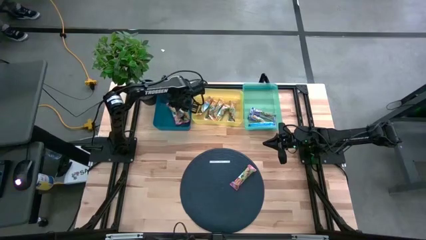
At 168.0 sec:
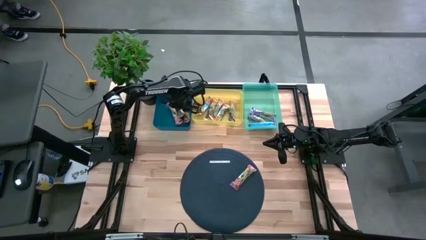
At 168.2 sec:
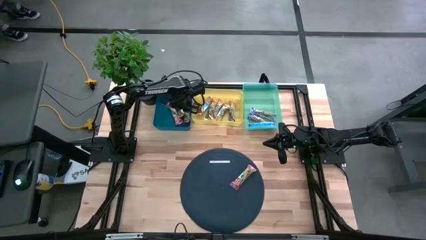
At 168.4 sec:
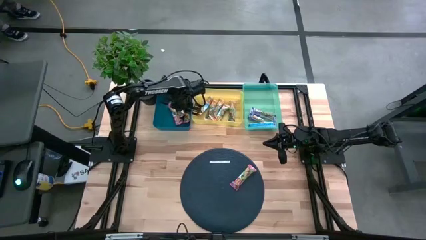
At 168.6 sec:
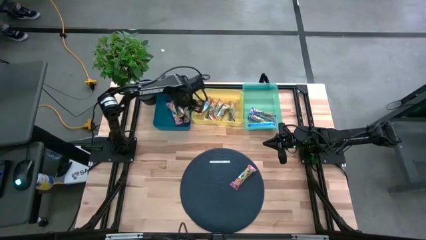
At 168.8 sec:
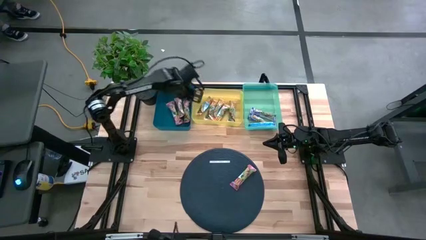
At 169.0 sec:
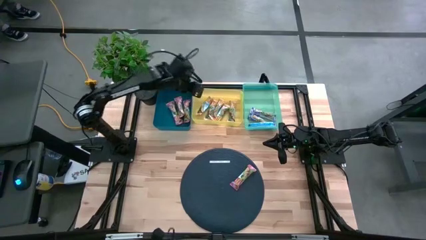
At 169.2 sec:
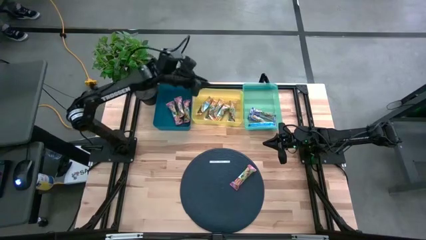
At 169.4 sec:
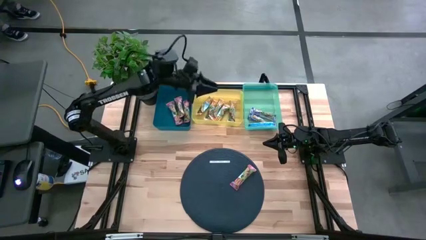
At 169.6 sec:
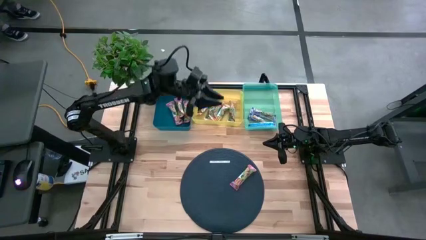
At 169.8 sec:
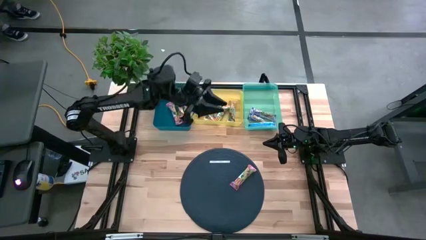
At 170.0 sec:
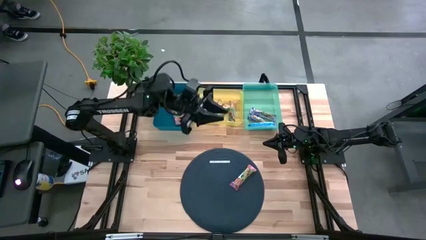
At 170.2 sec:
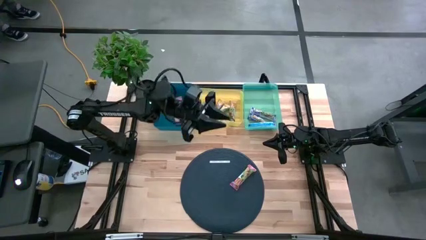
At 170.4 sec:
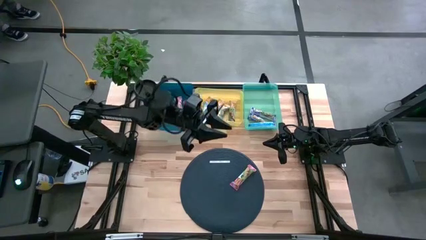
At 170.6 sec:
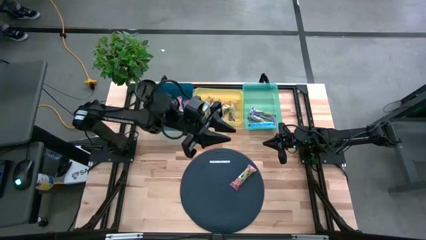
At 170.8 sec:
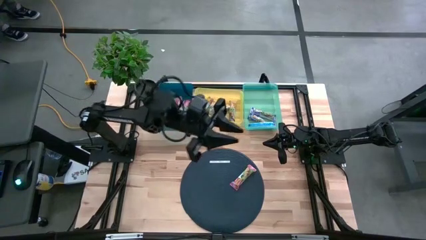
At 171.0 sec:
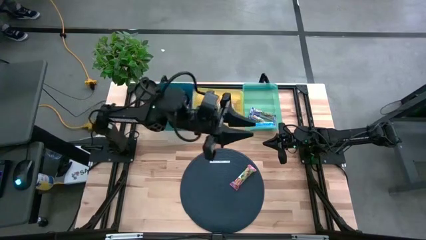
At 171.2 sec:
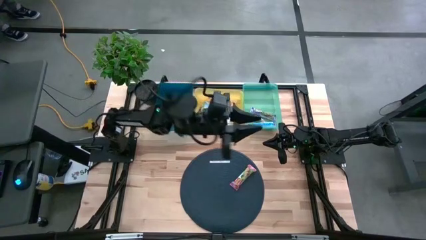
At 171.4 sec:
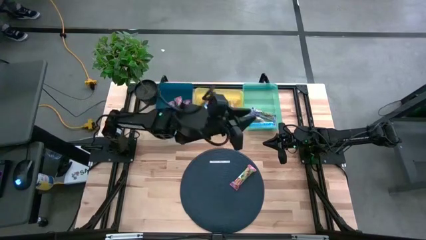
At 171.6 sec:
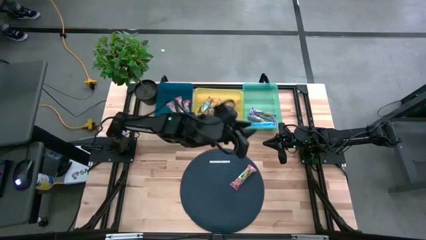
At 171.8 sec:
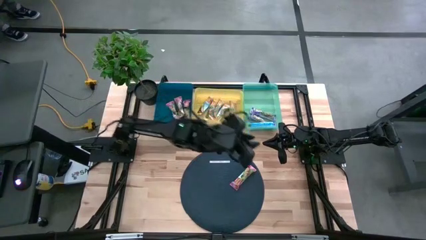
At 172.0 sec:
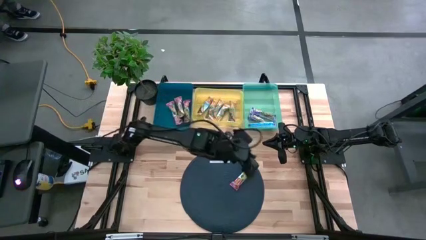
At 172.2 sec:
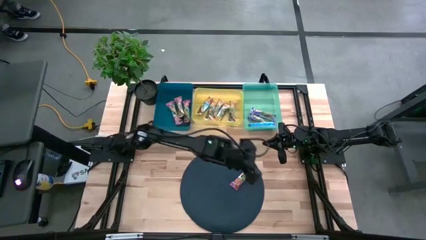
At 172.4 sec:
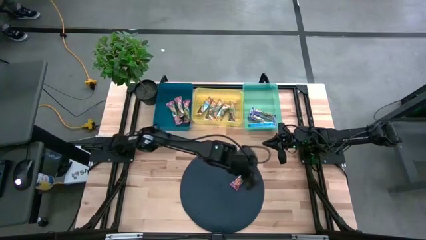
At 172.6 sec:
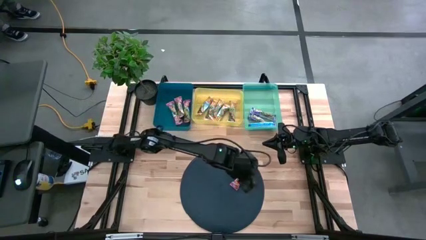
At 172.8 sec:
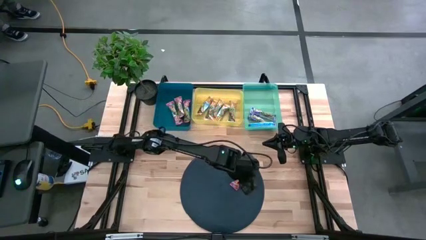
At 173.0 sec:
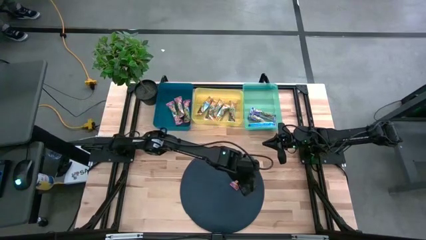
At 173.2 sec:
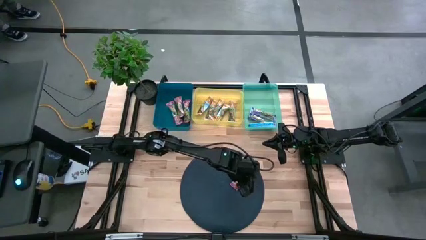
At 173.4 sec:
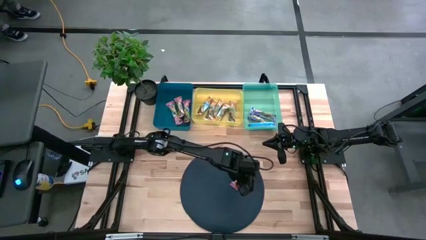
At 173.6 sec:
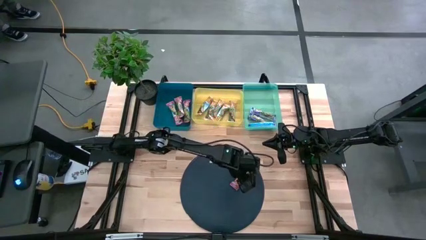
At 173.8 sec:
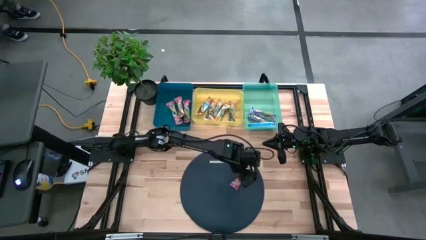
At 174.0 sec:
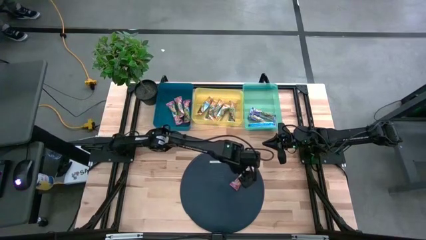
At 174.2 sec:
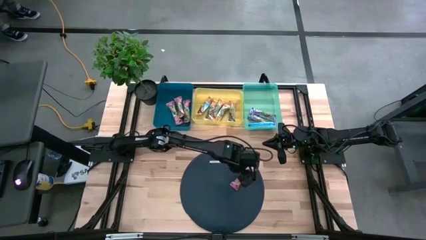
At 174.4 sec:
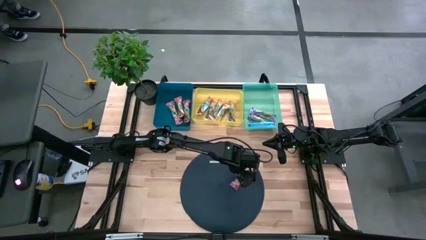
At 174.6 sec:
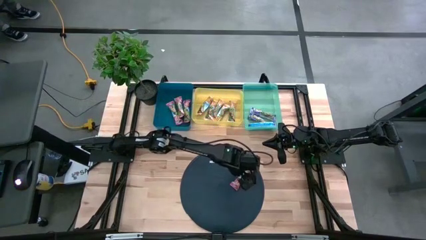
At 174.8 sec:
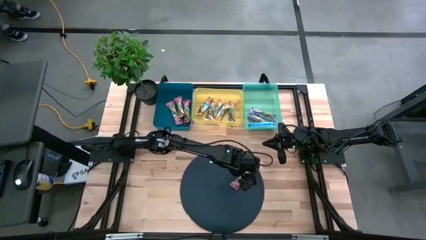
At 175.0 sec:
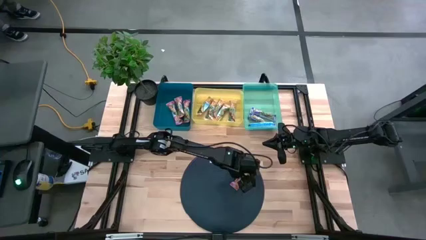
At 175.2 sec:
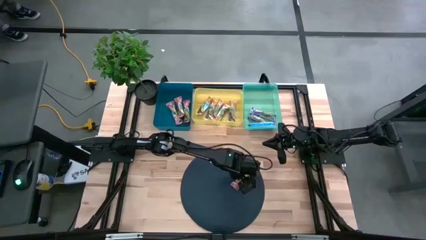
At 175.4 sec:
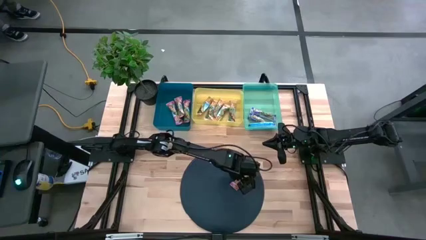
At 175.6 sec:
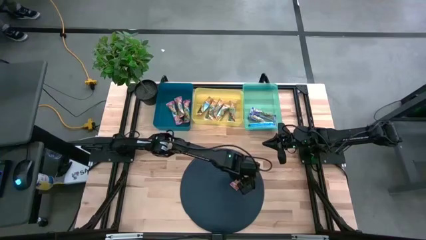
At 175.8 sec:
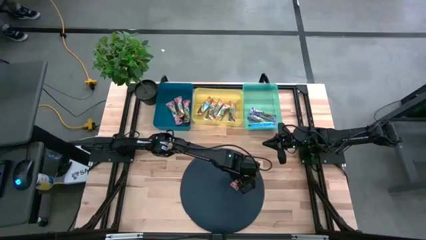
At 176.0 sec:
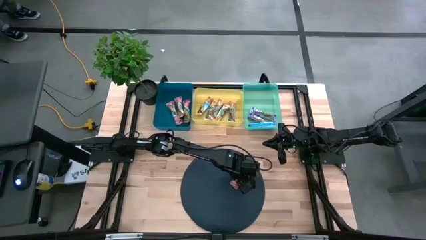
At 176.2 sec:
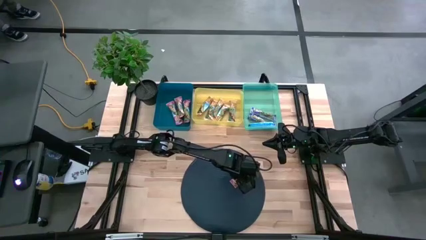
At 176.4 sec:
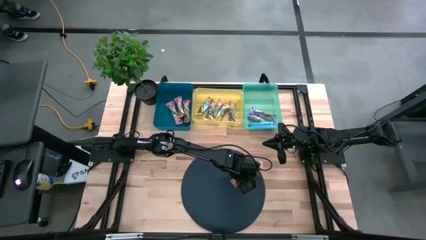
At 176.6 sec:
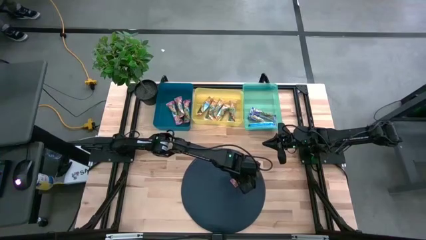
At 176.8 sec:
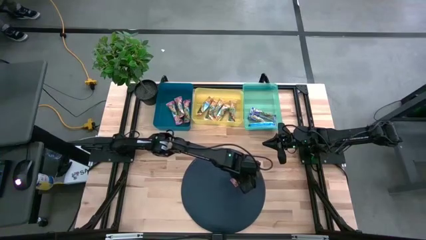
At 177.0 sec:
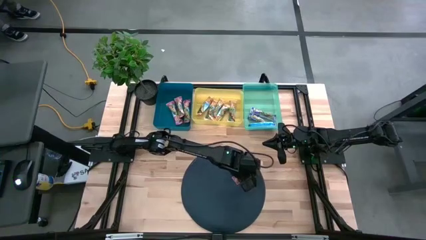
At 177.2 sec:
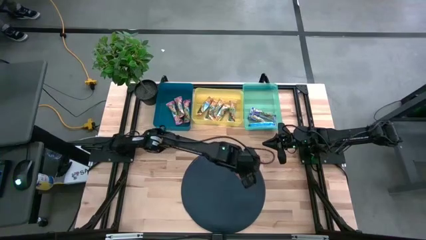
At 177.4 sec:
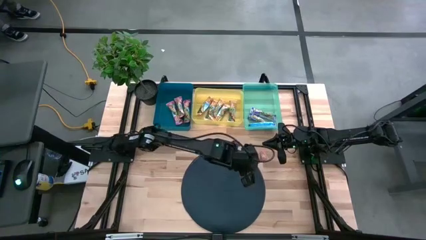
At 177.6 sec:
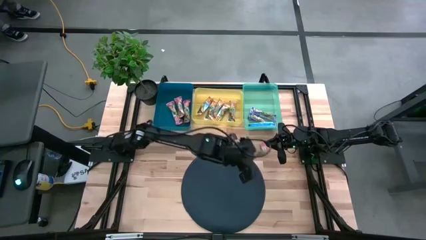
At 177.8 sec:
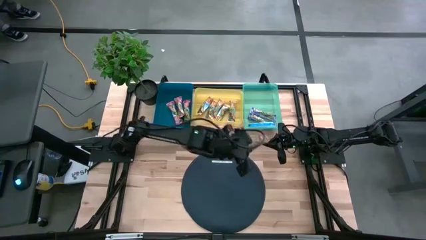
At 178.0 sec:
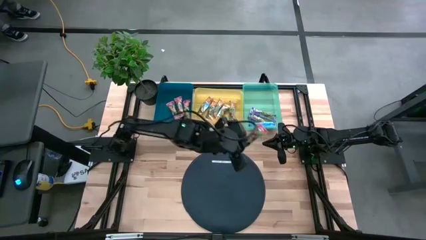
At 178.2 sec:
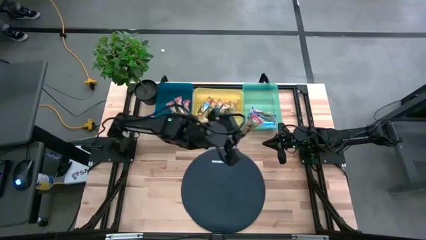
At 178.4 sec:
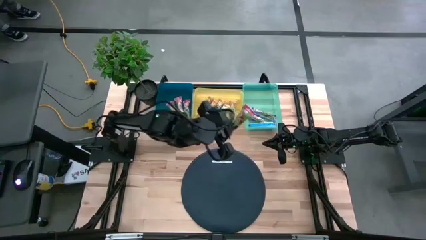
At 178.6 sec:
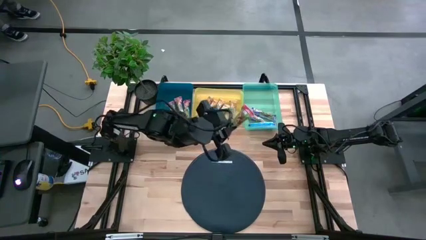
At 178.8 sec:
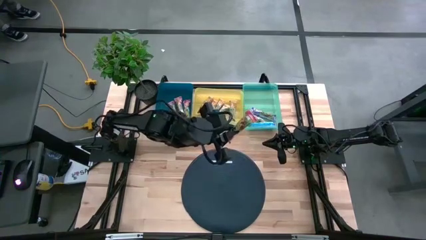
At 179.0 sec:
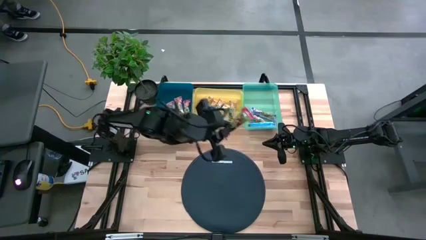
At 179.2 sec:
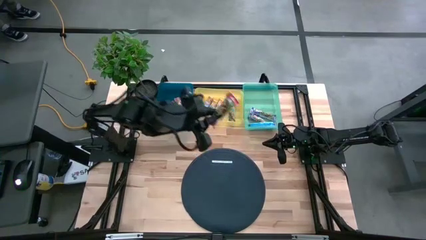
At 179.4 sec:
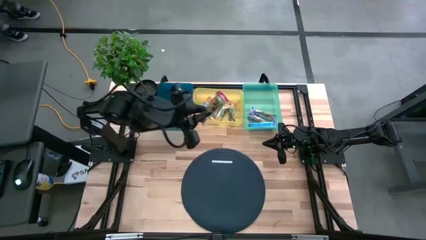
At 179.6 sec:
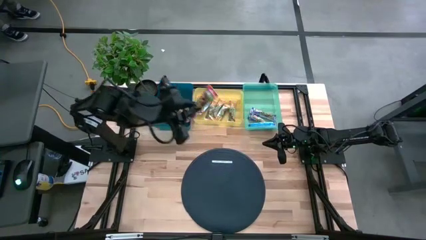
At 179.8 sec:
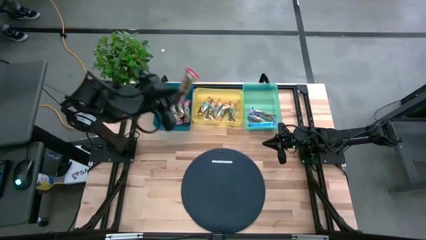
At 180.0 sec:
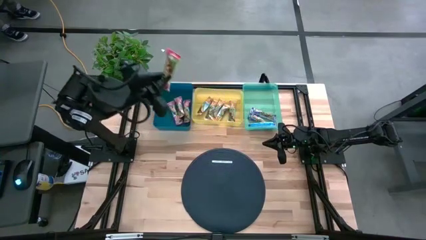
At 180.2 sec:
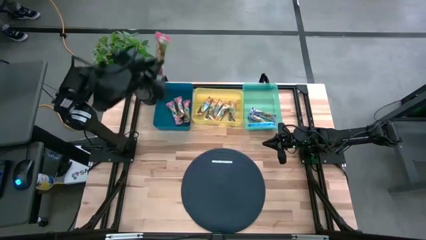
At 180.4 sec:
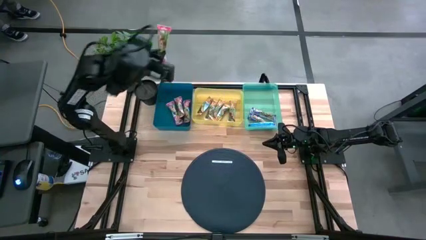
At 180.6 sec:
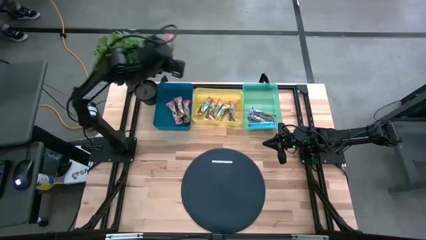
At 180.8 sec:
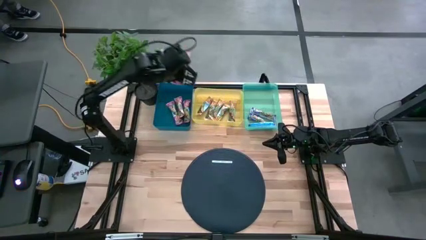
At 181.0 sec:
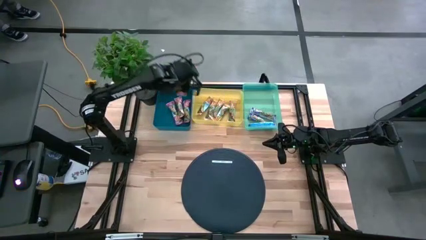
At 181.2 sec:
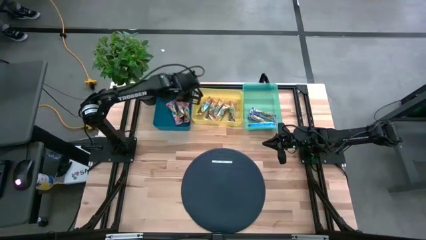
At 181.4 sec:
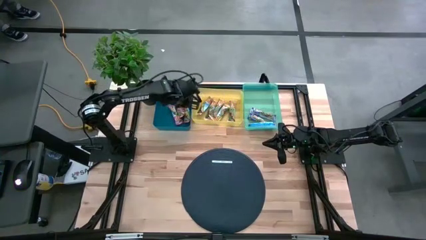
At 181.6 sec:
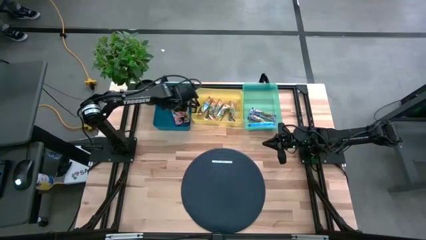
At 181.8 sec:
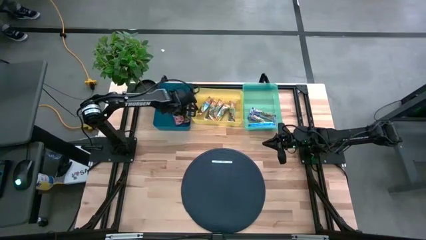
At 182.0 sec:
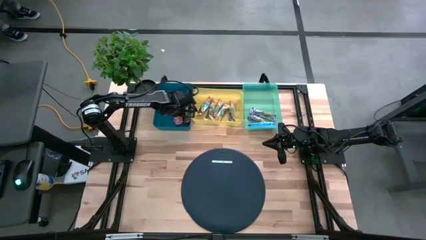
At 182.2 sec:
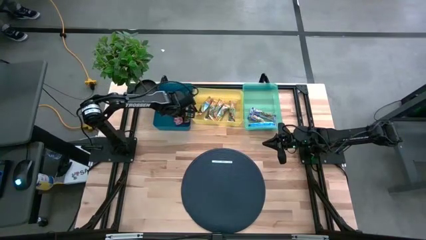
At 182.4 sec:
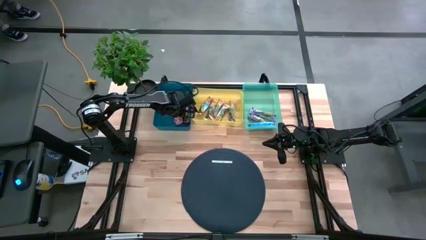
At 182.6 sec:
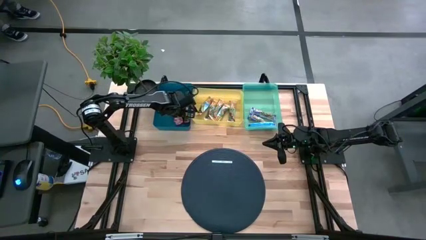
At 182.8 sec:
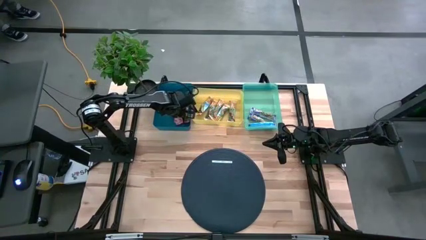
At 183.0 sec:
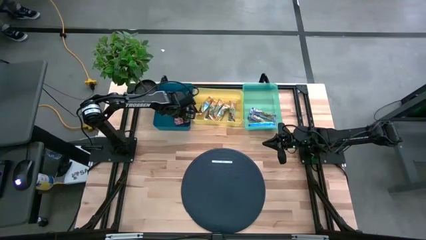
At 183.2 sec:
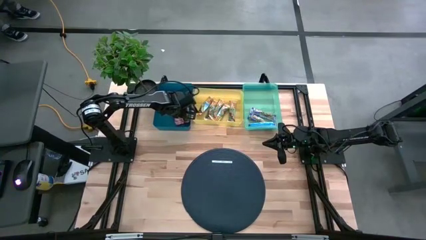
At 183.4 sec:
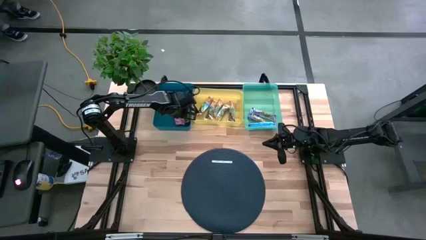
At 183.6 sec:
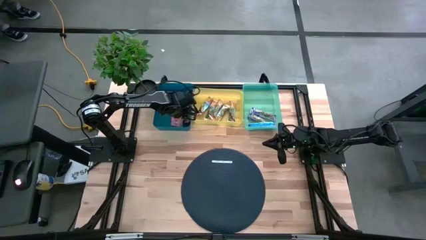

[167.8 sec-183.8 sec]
Task: Pick and place Granola Bars by type
Put the red granola bar into the blue bin

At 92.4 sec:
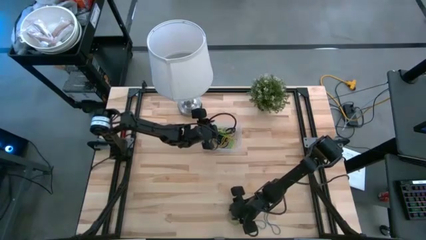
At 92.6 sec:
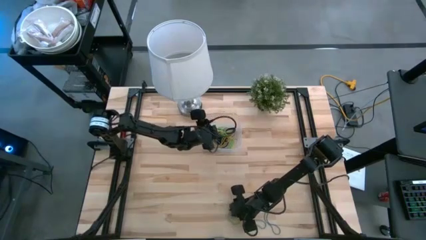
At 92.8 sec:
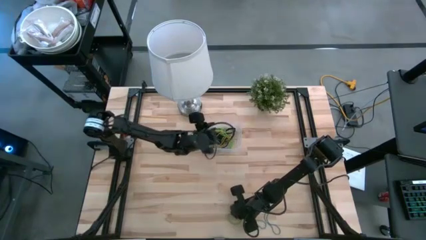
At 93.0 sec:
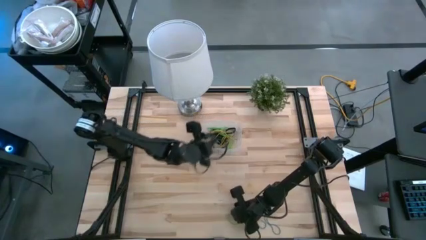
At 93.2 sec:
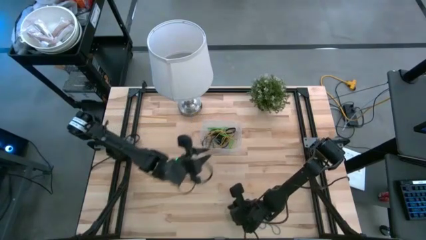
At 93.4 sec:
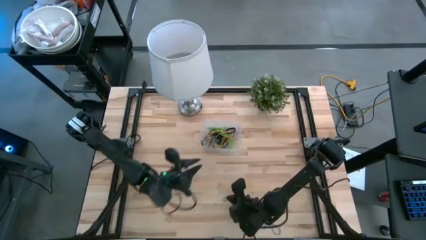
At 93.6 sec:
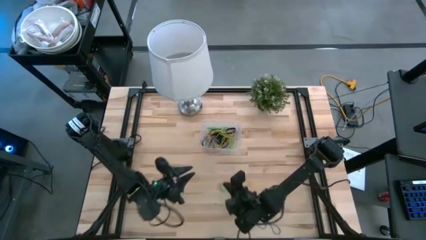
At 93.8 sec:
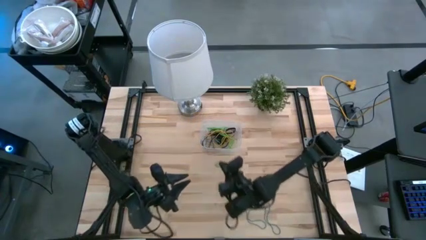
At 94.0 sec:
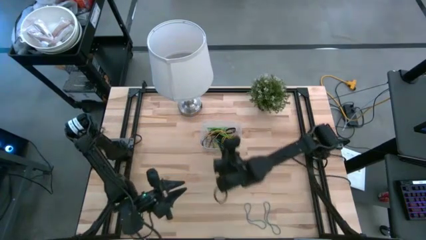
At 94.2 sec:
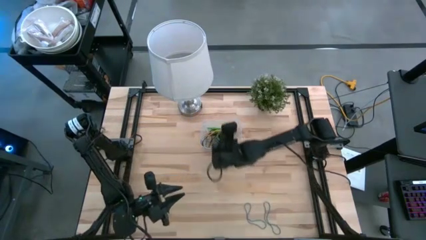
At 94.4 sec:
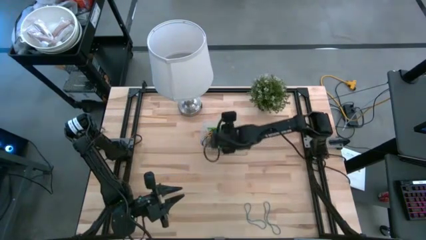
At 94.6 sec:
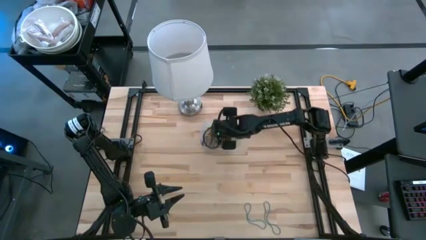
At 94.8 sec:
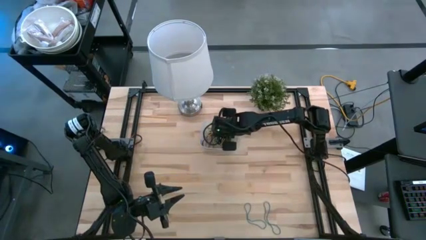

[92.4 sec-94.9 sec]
Task: Pick and place rubber bands into bin
Put the green rubber band into the transparent bin
